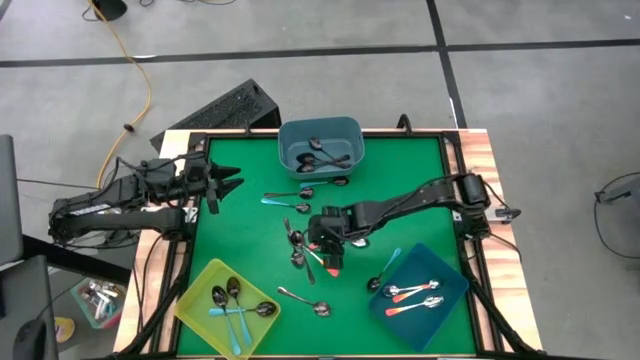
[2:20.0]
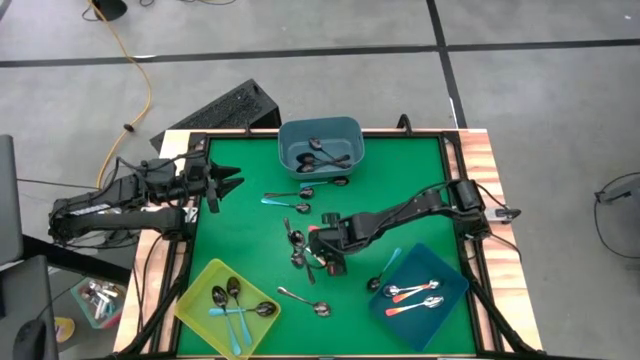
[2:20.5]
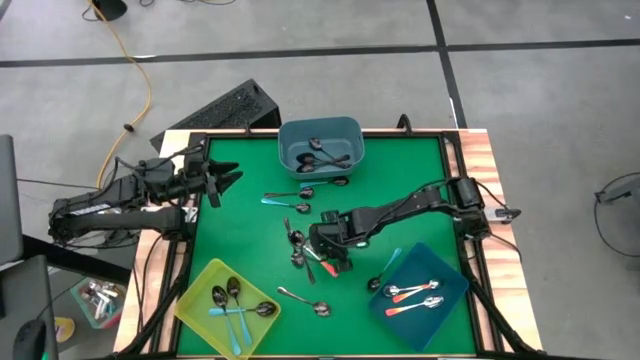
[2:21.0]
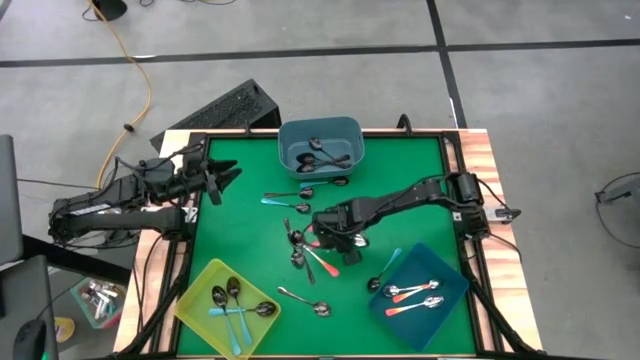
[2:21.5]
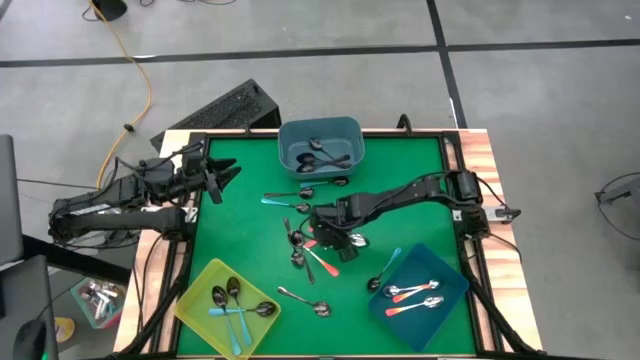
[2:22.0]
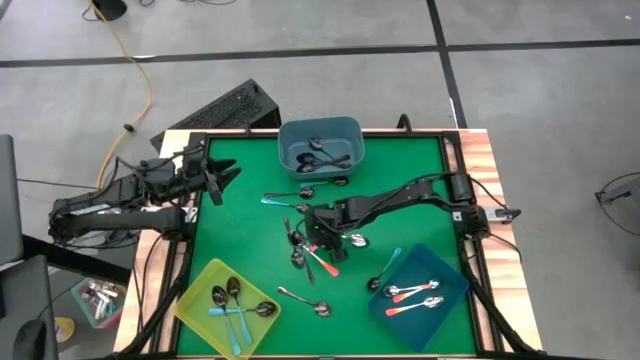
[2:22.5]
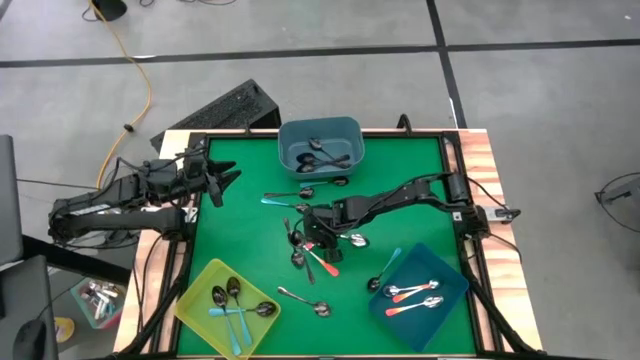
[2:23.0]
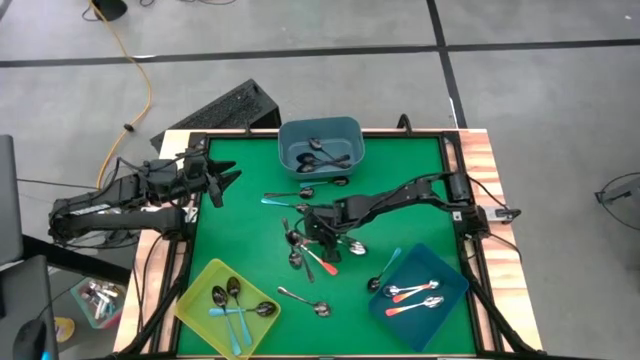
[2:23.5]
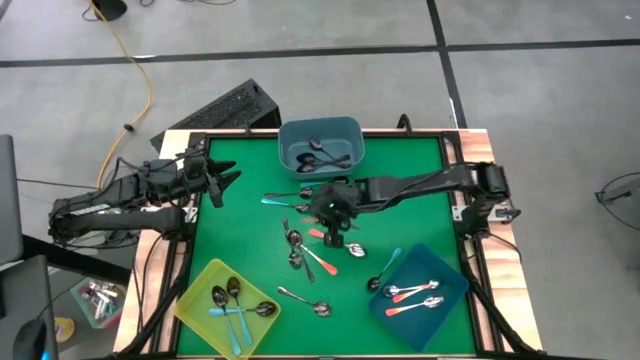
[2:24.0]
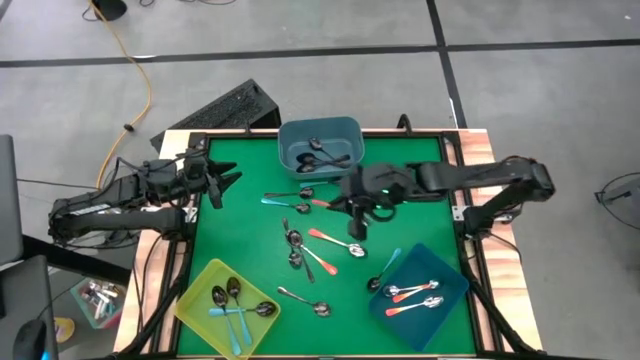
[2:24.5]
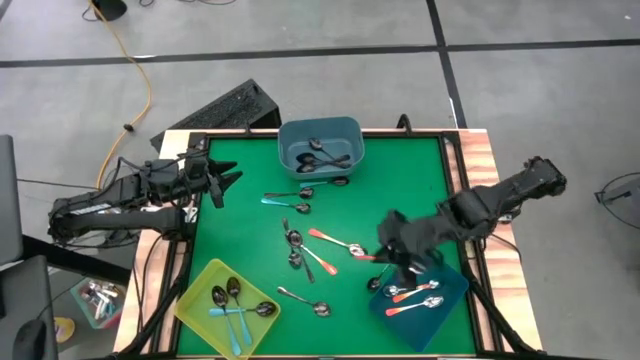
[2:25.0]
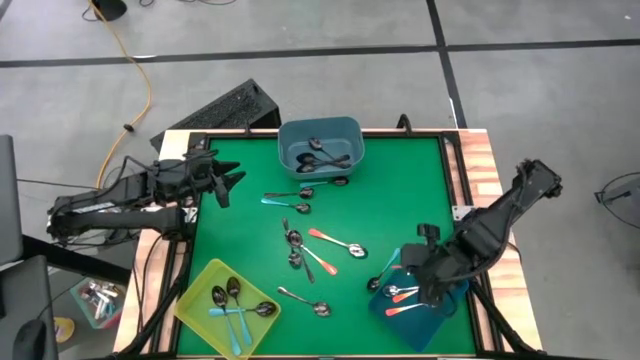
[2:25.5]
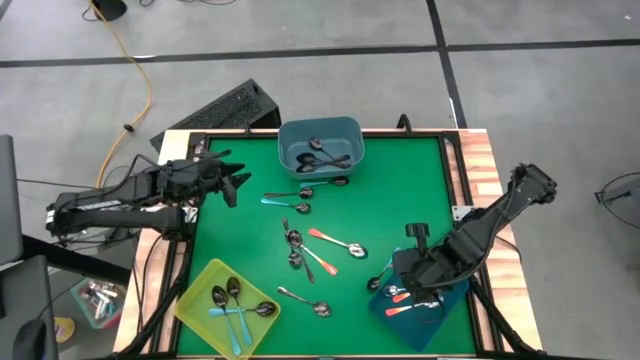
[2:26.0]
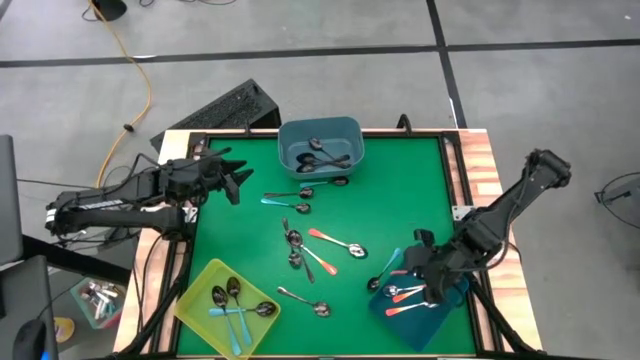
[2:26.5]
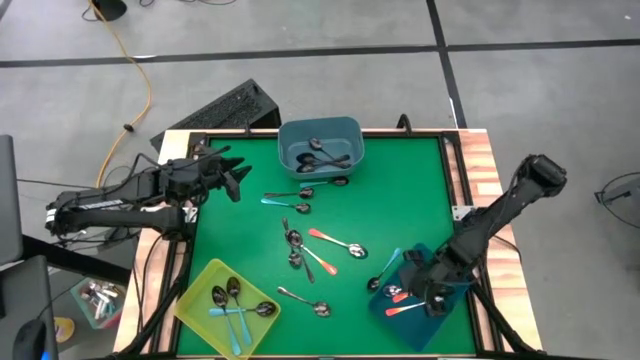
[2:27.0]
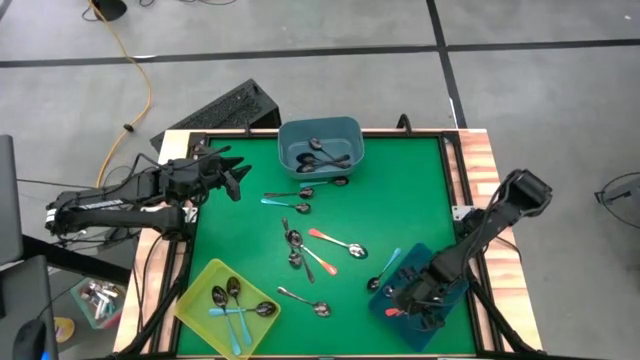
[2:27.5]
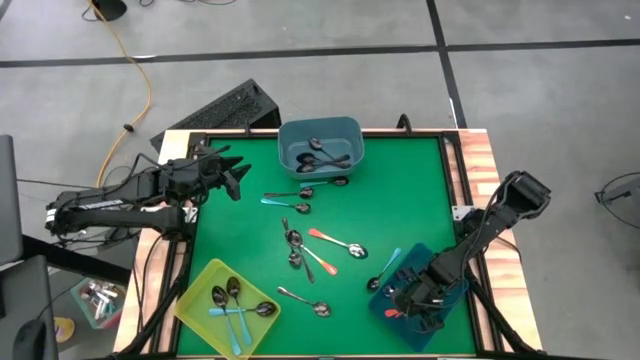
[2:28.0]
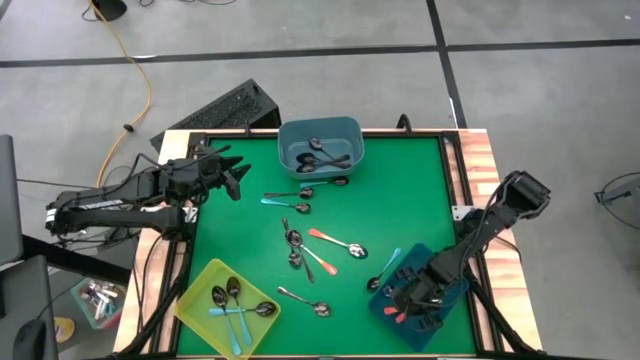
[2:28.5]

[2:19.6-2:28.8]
Task: Sort silverware by color (type)
Put the orange spoon into the dark blue bin

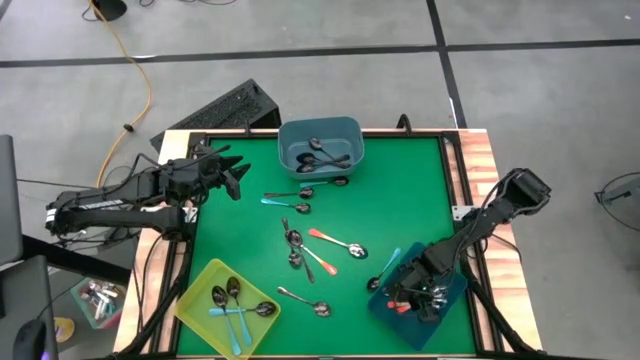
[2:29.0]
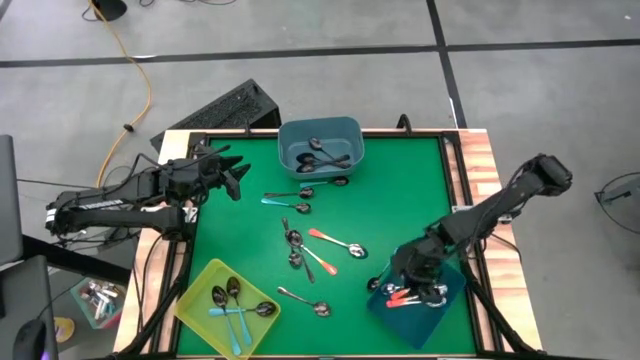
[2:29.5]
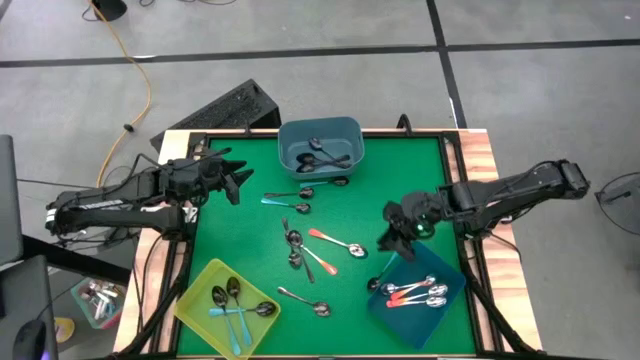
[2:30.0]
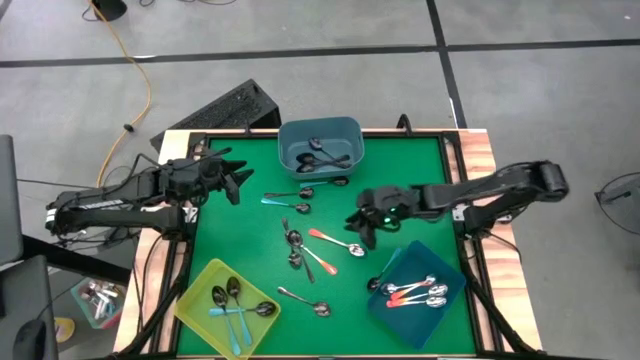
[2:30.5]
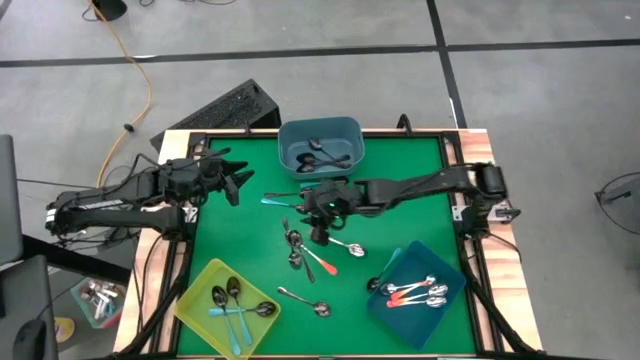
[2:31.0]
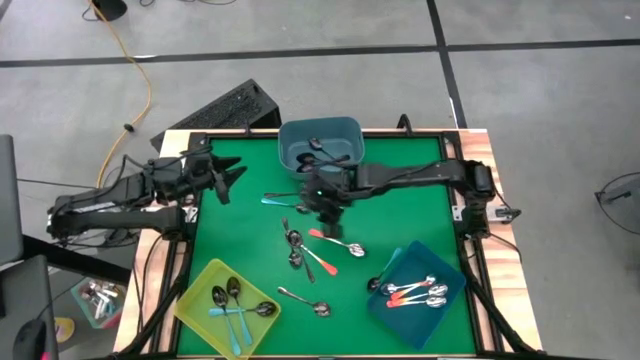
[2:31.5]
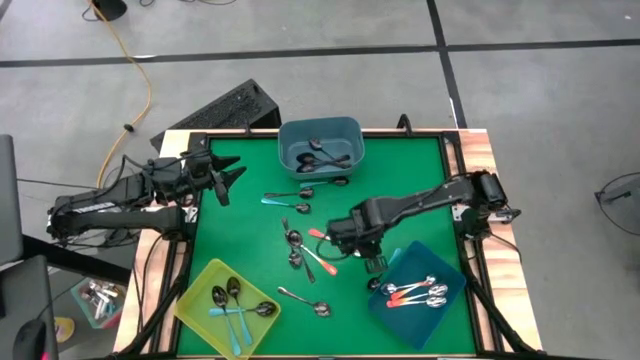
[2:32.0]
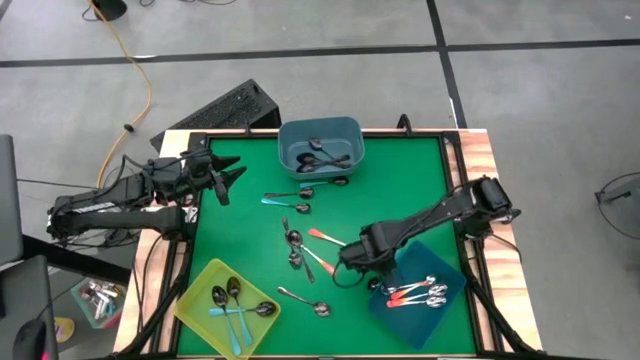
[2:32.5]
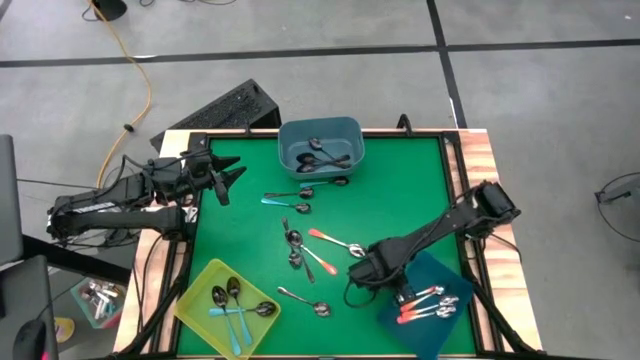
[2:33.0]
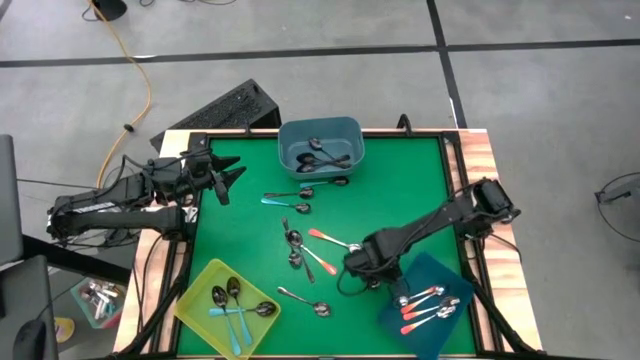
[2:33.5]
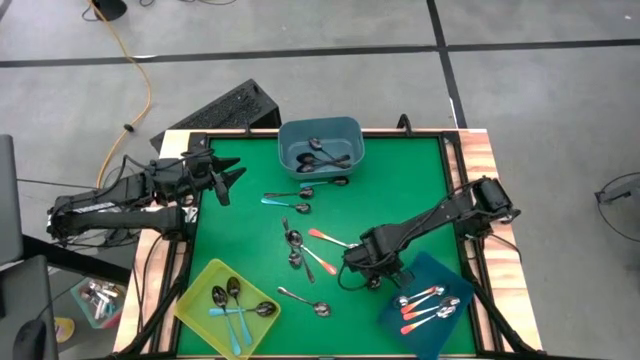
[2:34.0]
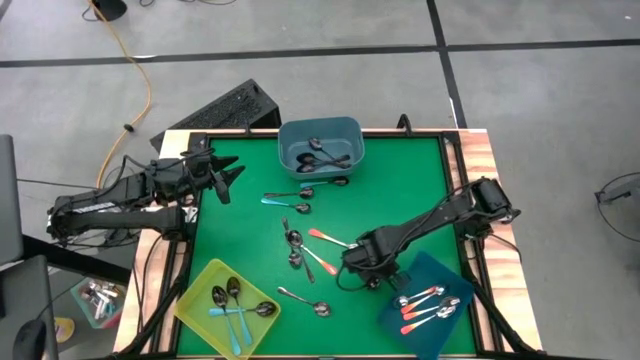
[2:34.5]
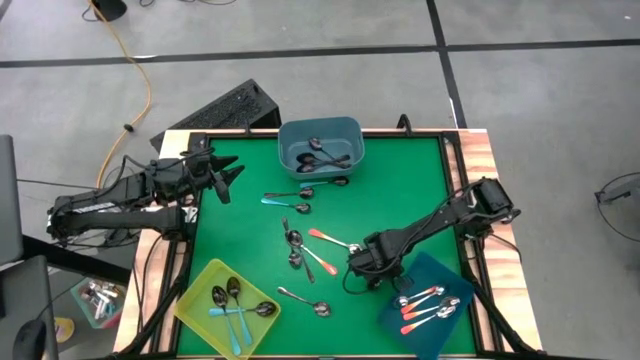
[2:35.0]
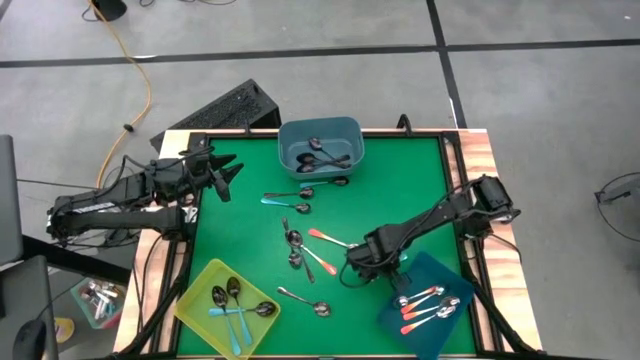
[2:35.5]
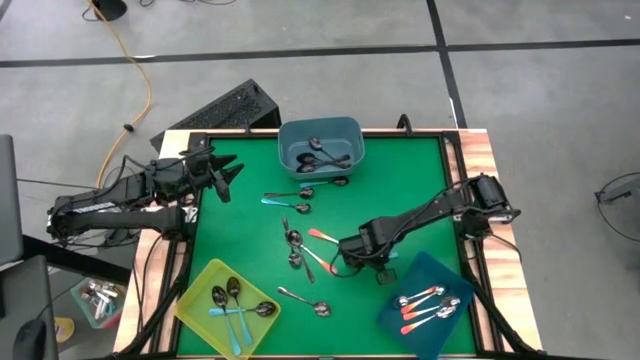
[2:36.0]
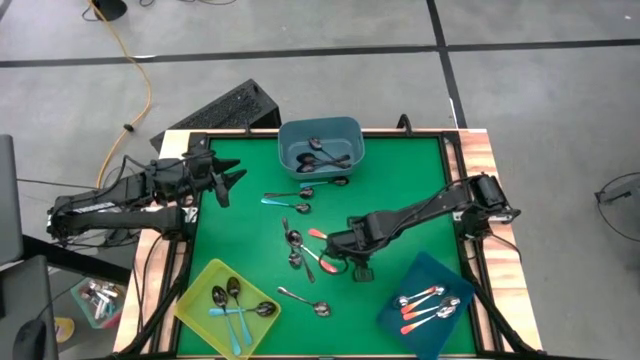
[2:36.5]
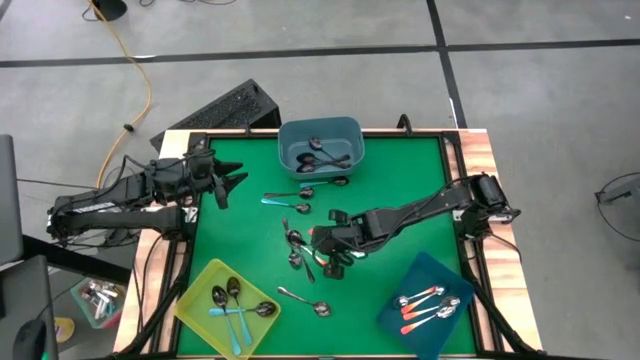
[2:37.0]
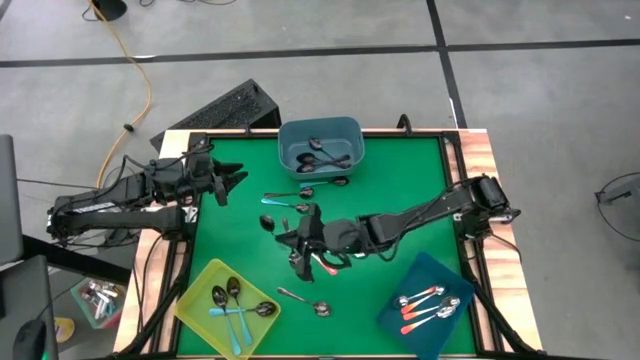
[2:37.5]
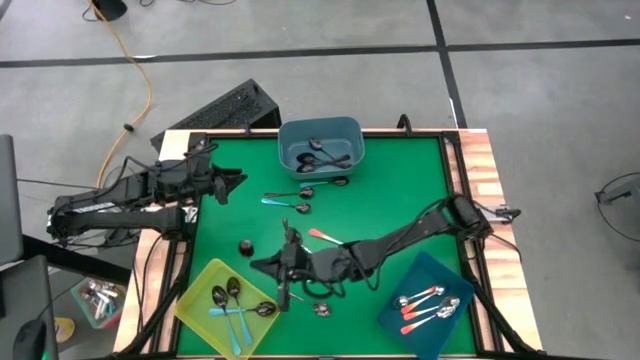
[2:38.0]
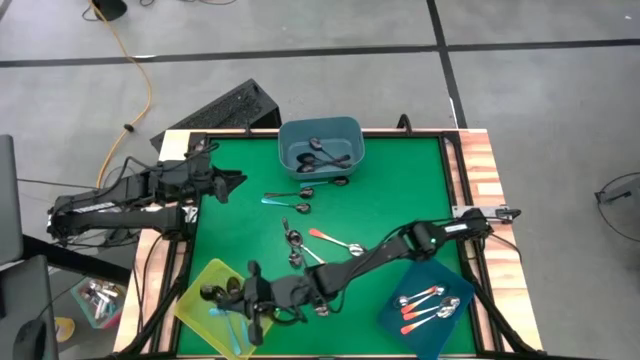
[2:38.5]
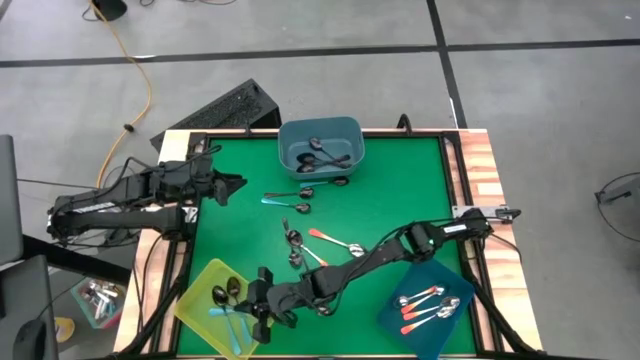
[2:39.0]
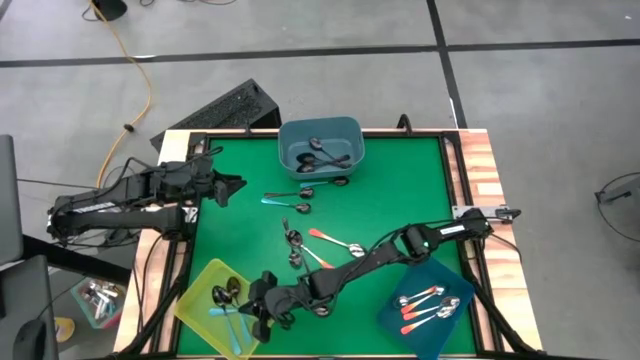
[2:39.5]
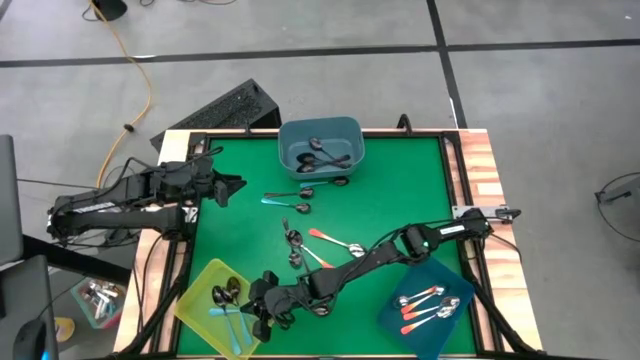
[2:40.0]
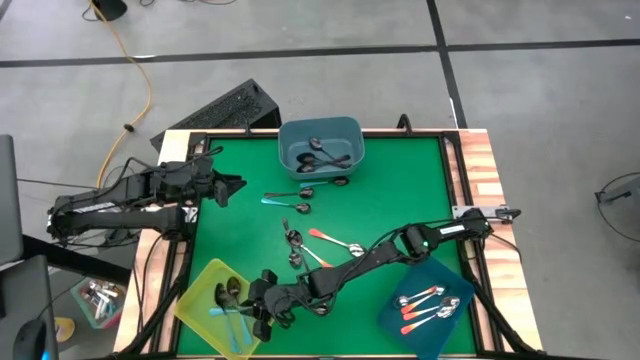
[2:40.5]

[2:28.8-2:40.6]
Put the light blue spoon into the yellow bin

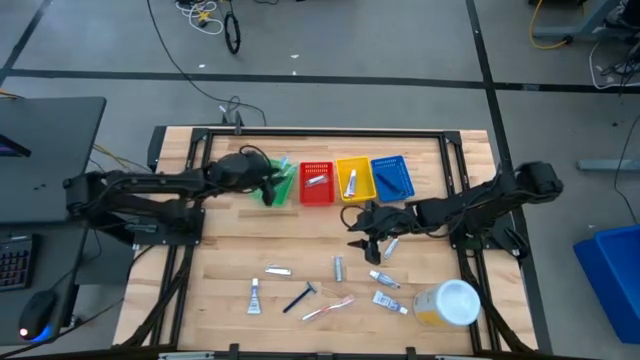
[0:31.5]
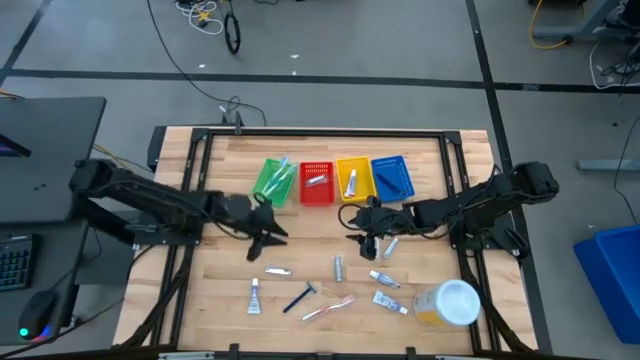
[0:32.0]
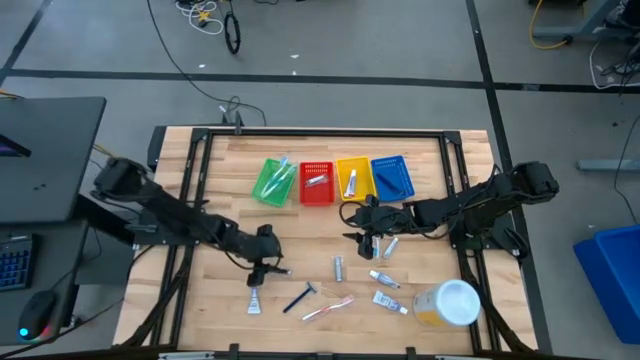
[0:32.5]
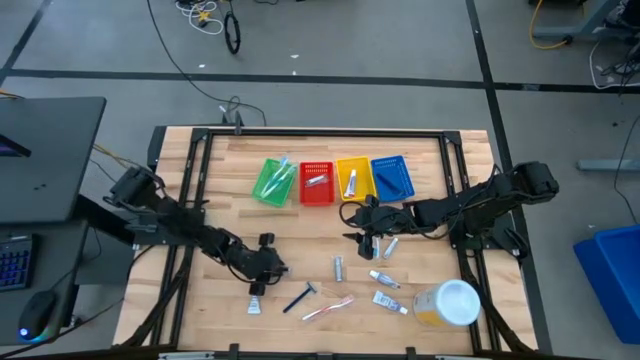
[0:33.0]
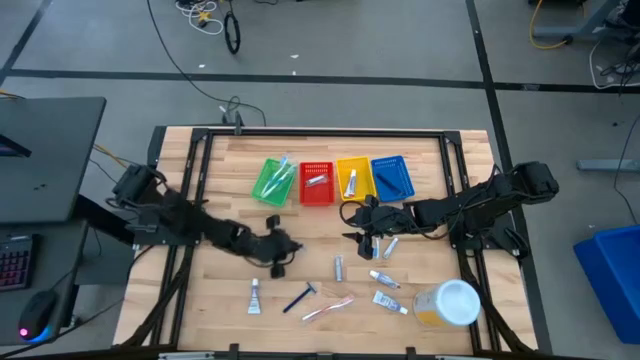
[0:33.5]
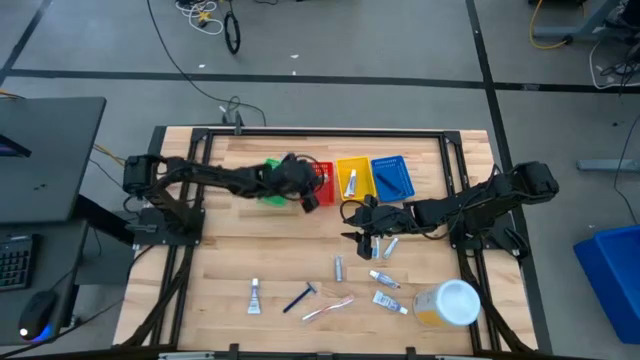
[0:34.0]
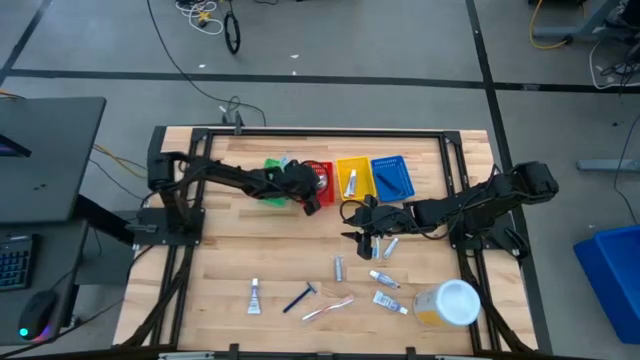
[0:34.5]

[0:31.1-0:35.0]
Task: Pick & Place Travel size toiletries
Put the silver nail cutter into the red bin
